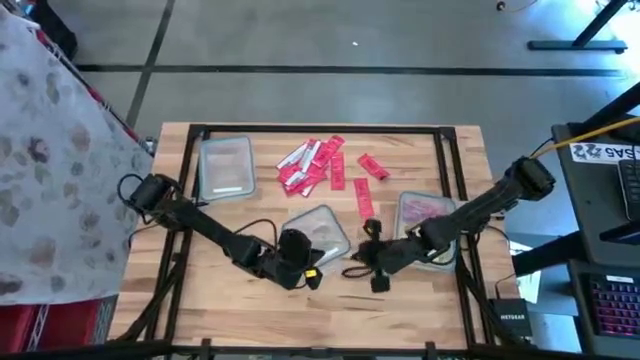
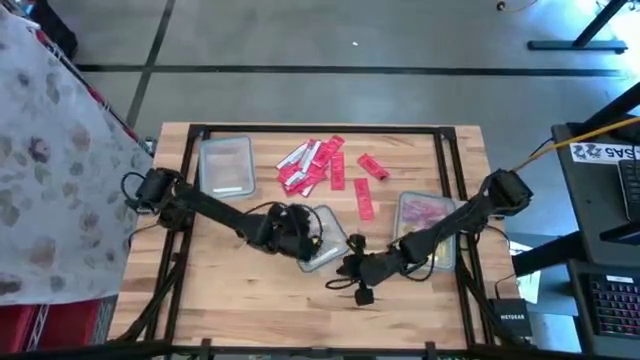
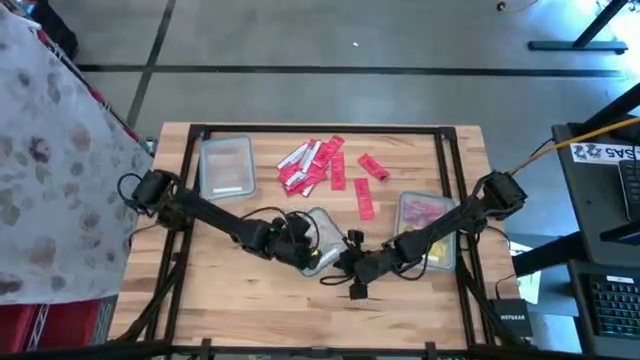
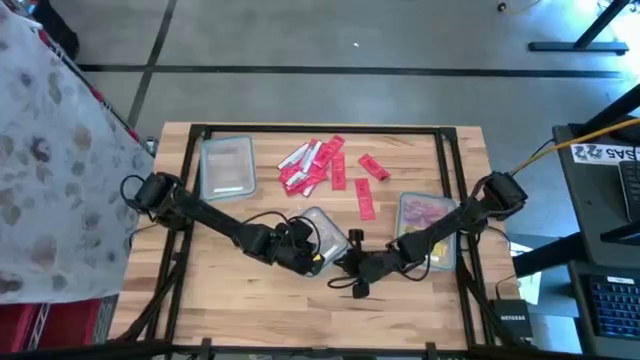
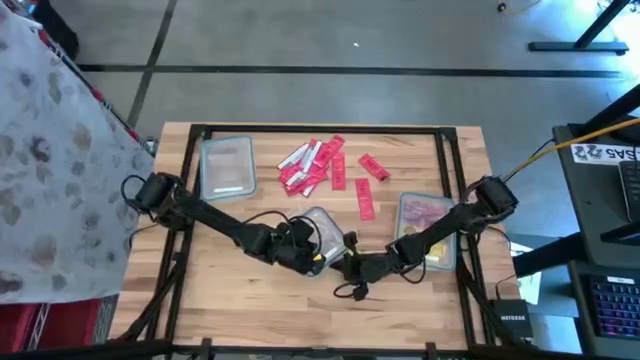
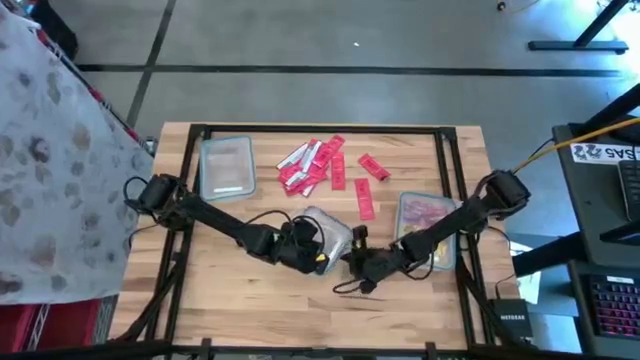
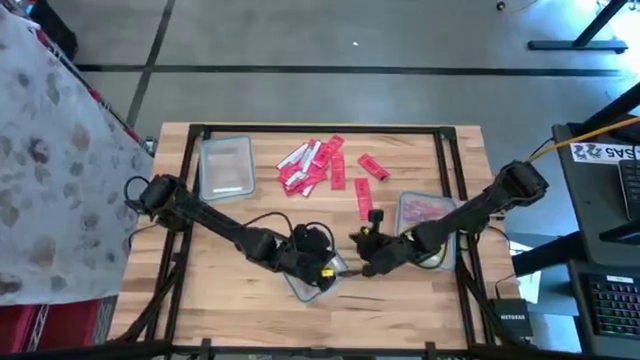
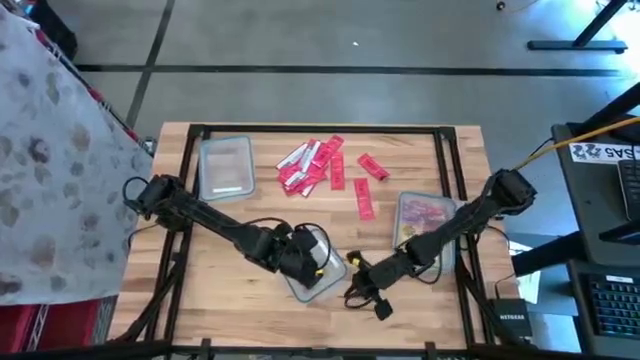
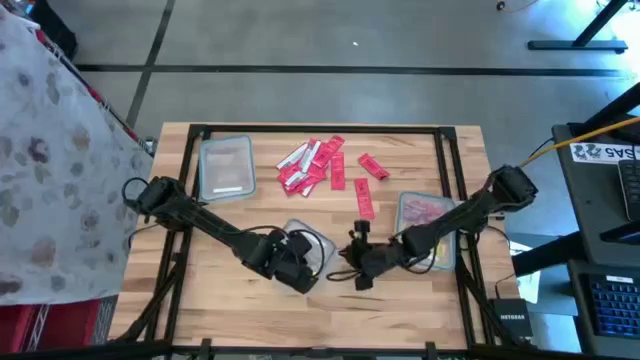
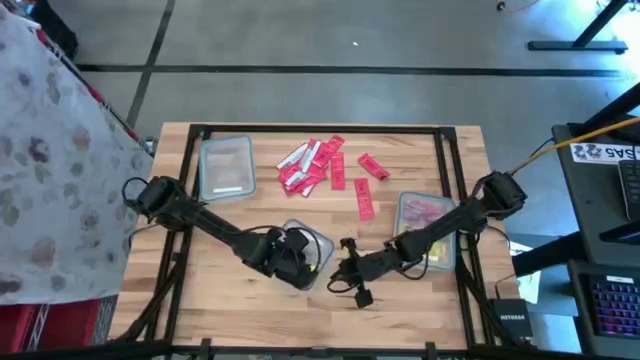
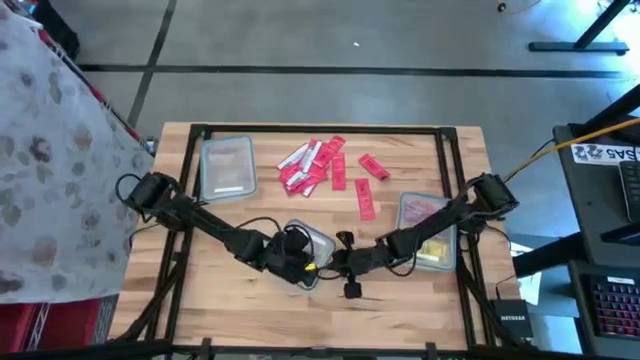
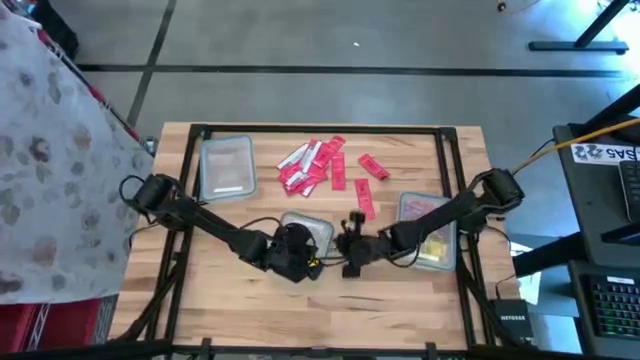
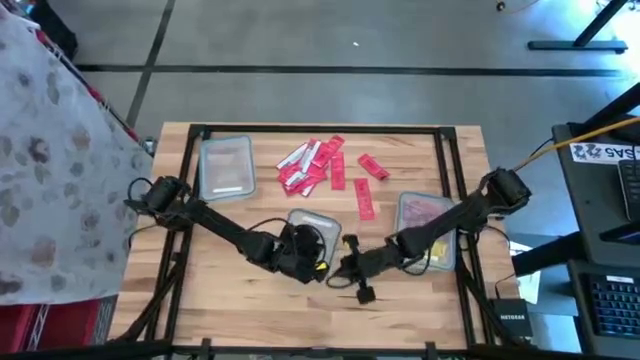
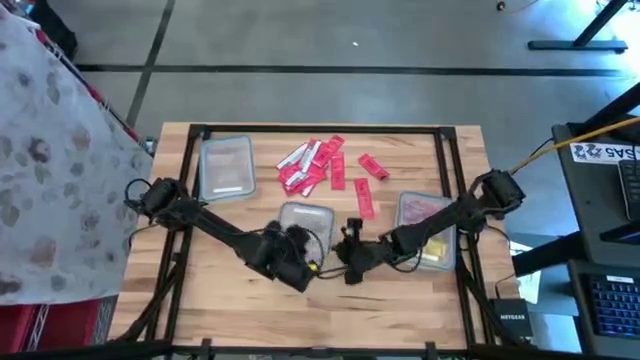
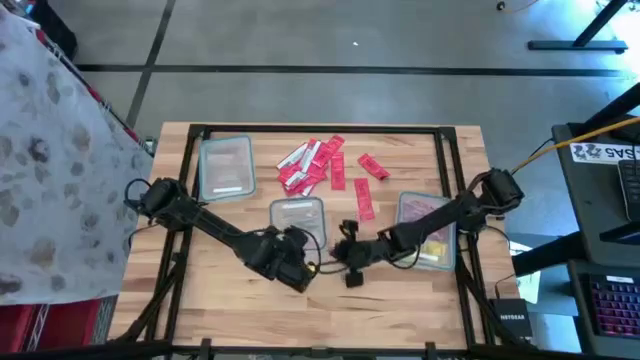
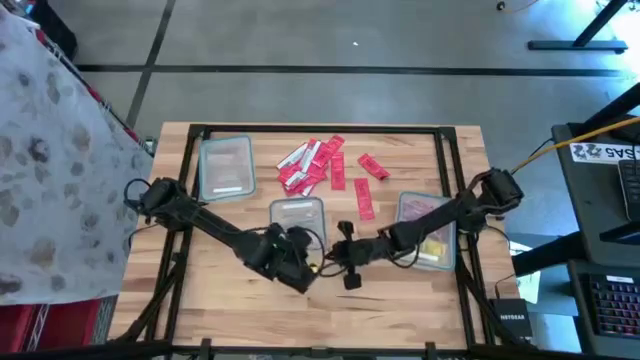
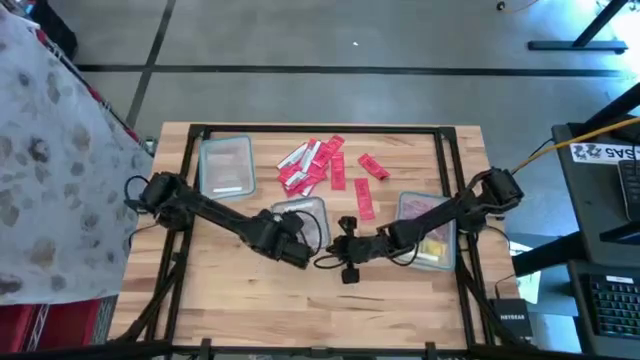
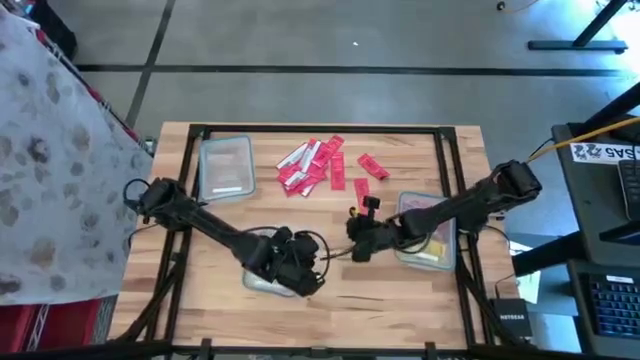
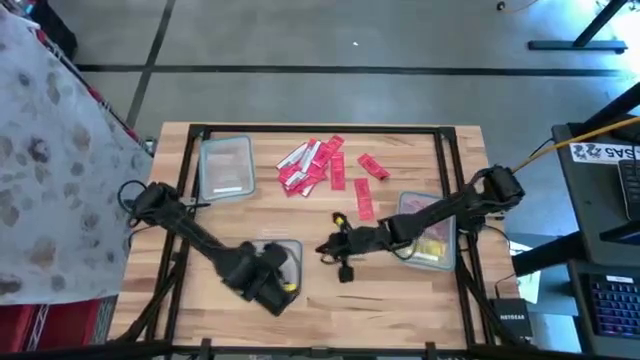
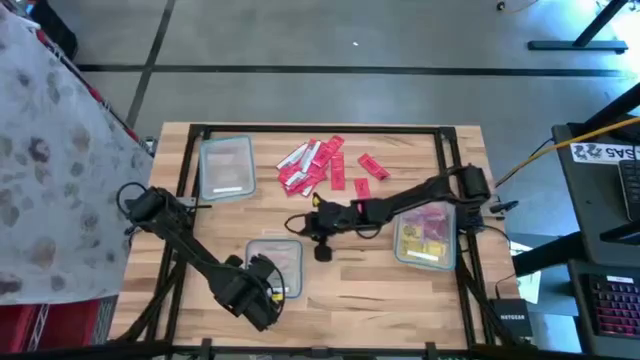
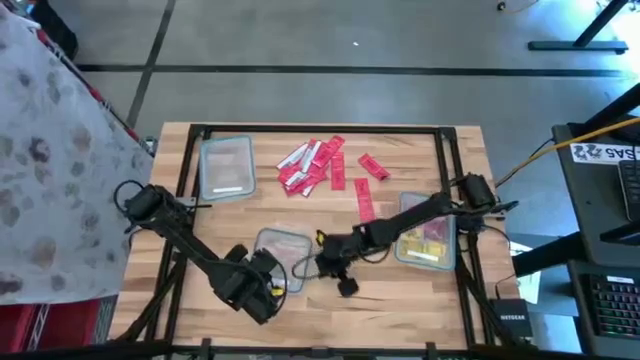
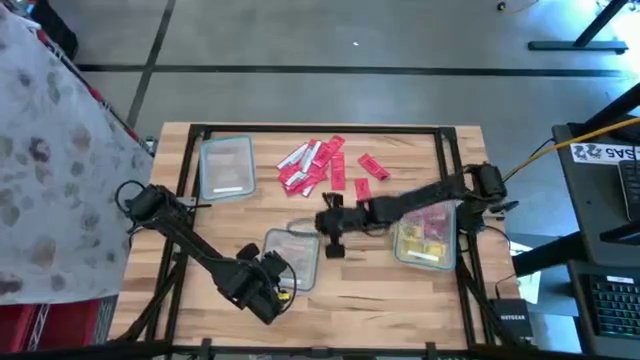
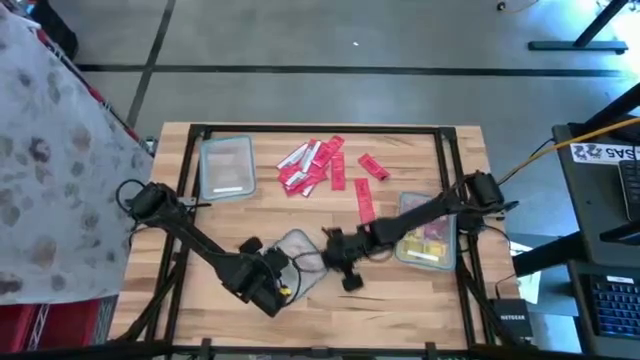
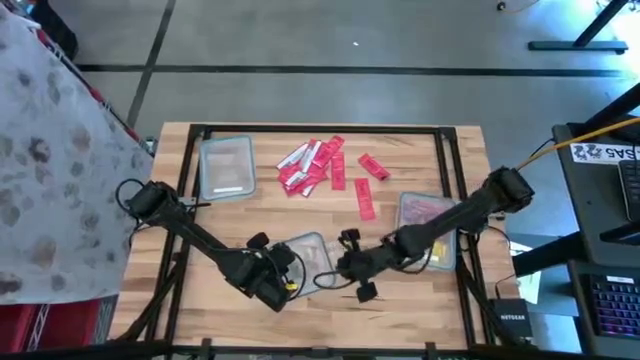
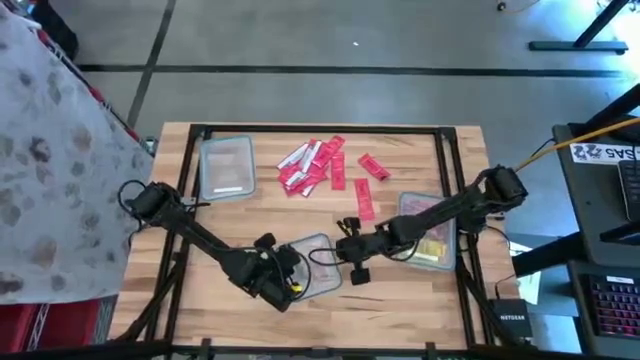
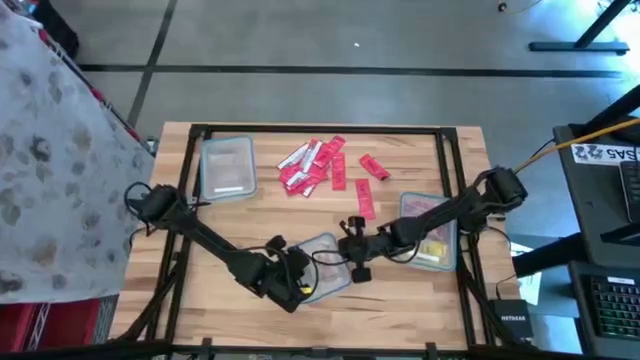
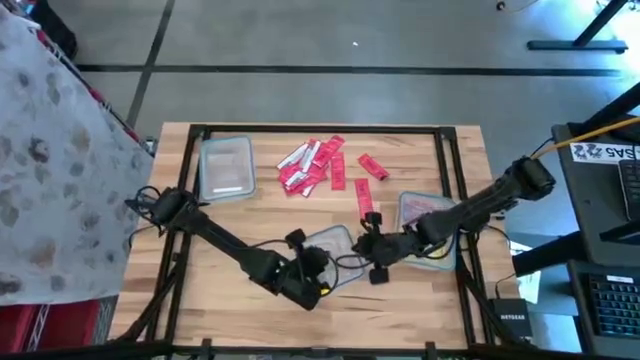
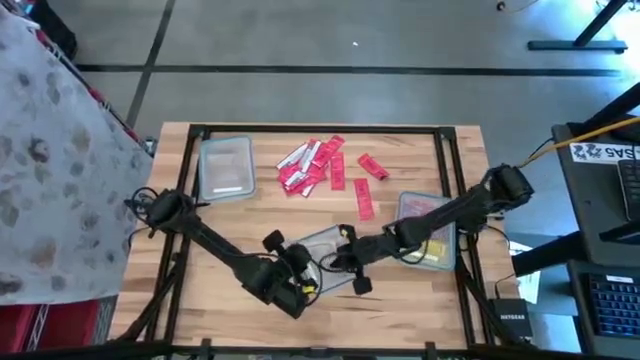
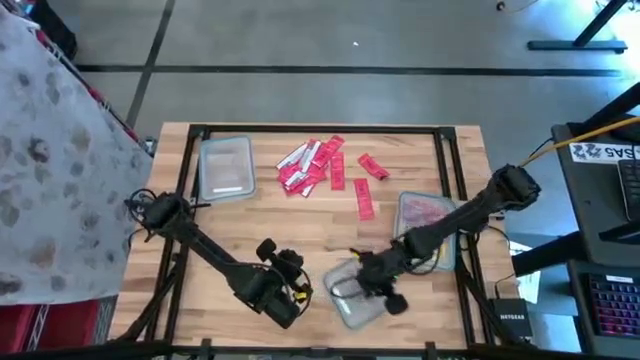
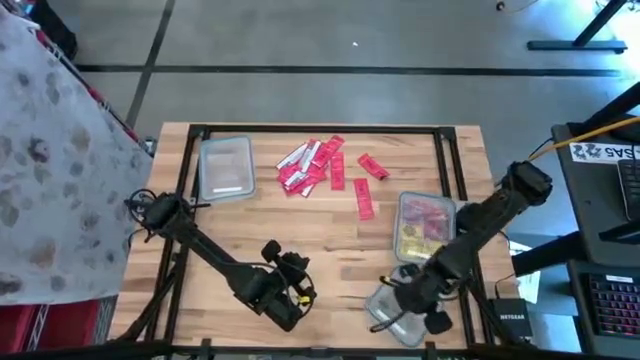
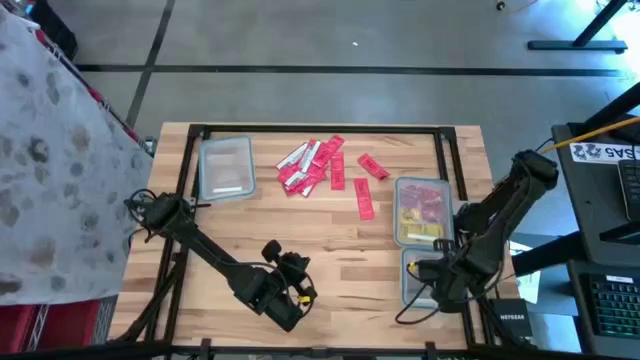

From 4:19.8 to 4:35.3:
Task: Sort candy
Close the square transparent bin

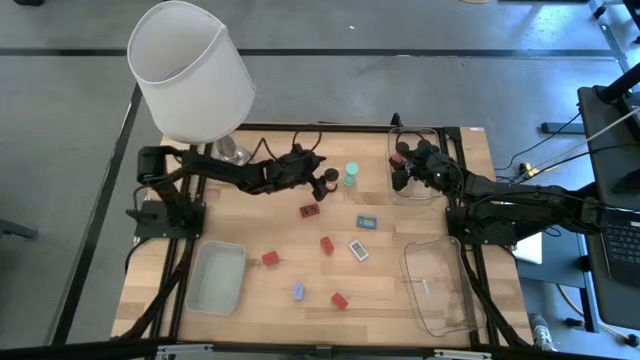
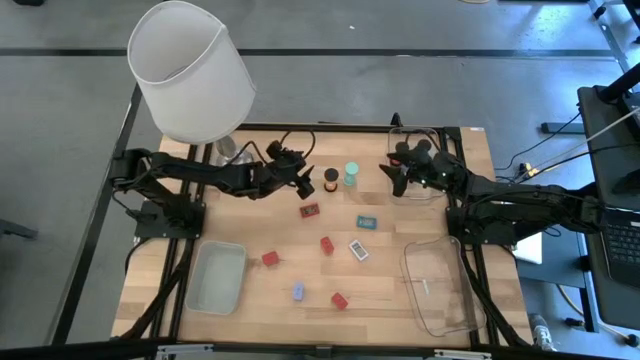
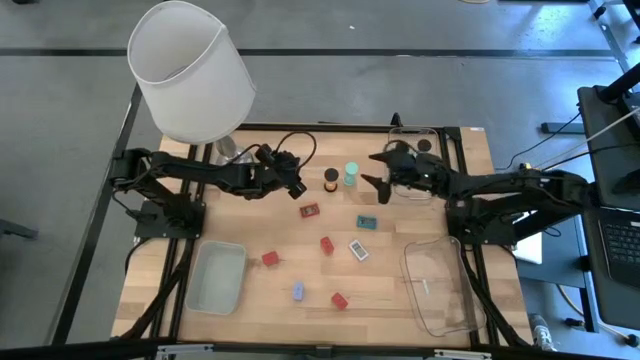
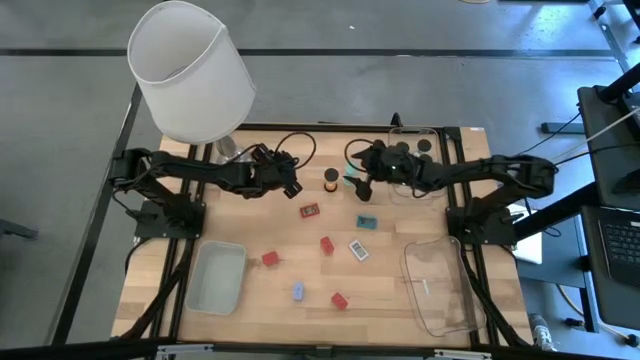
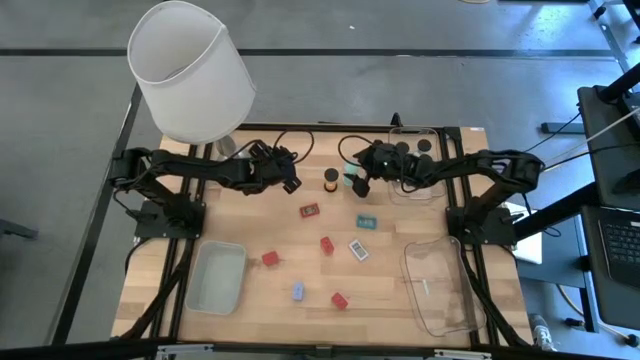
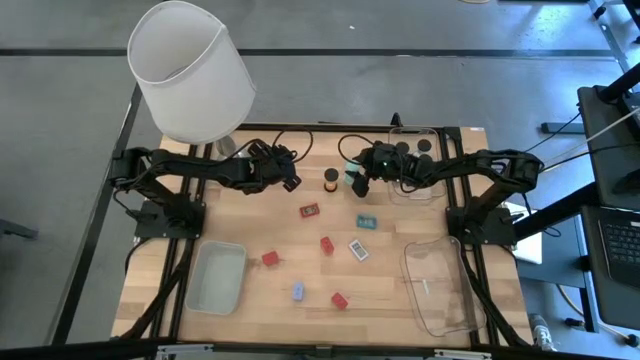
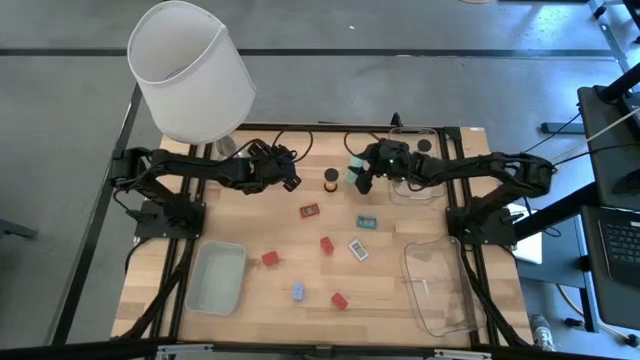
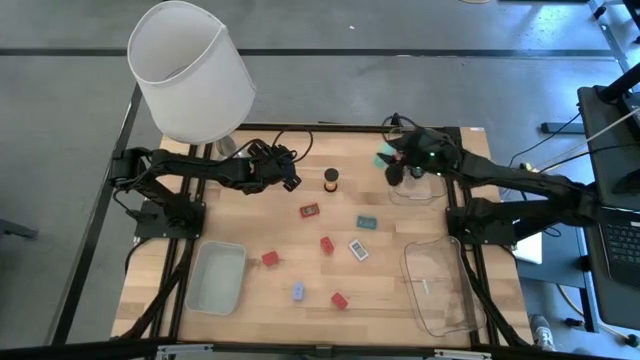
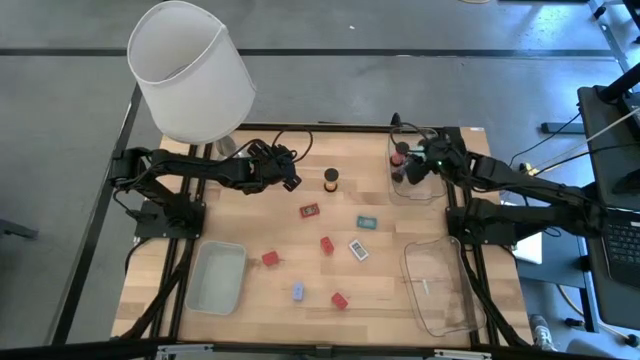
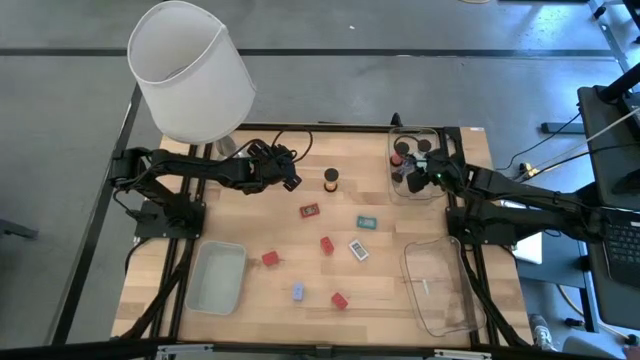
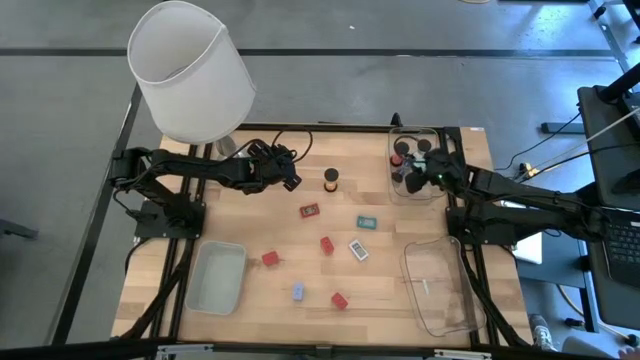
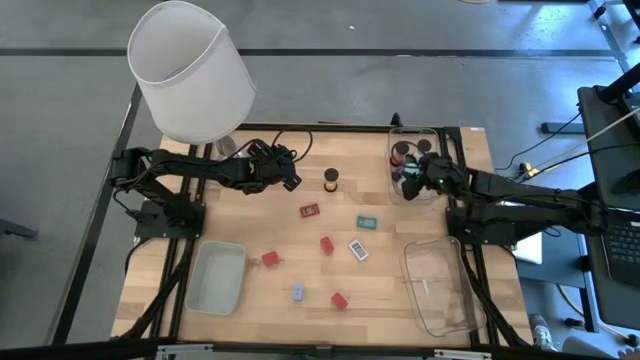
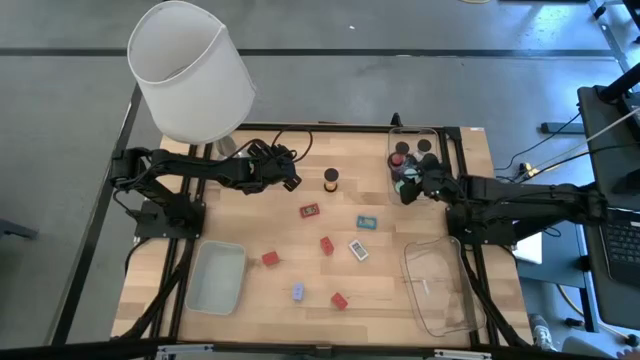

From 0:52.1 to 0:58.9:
Task: Pick & Place Office items
Put the light blue sand timer into the top transparent bin
